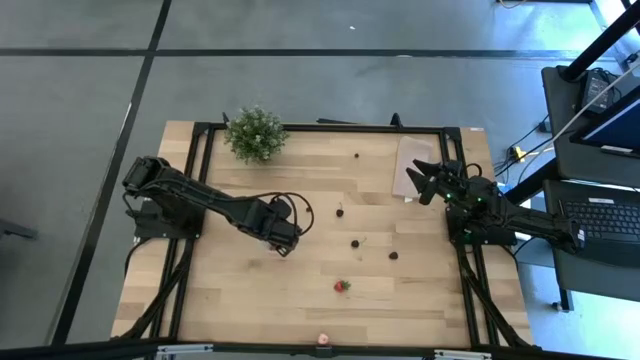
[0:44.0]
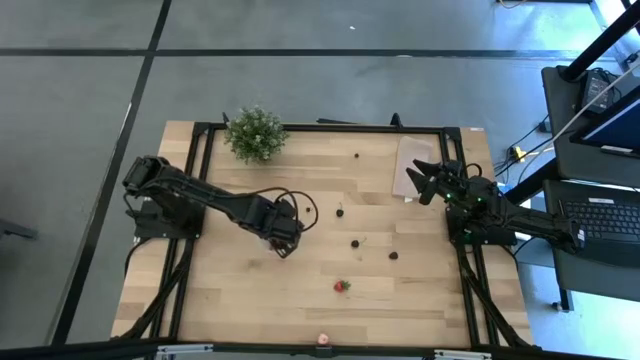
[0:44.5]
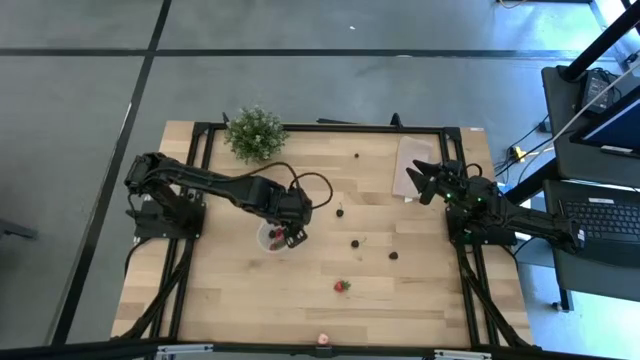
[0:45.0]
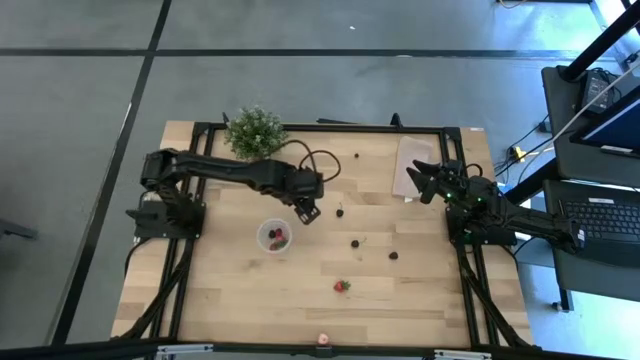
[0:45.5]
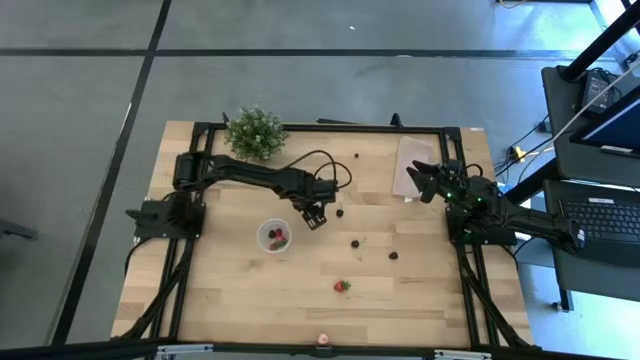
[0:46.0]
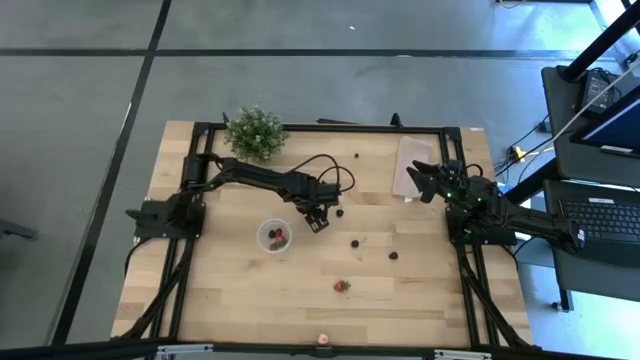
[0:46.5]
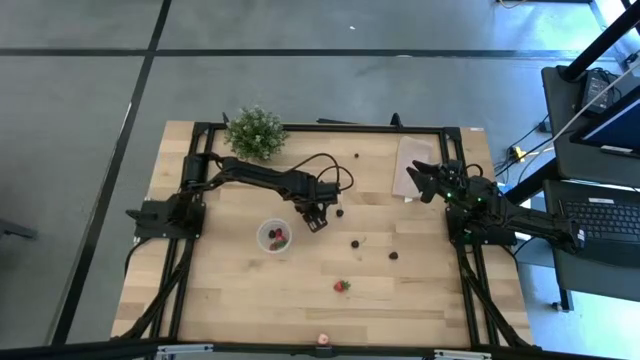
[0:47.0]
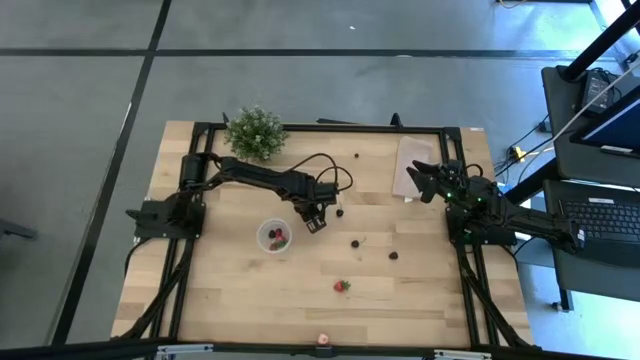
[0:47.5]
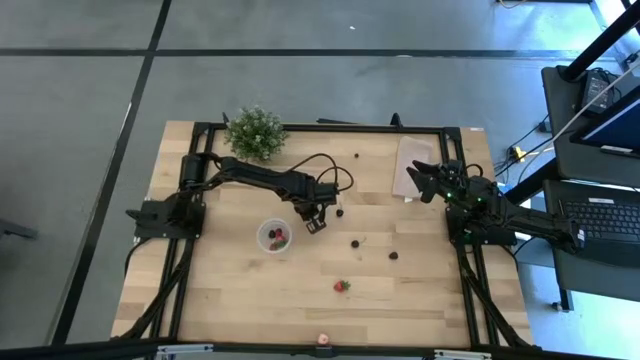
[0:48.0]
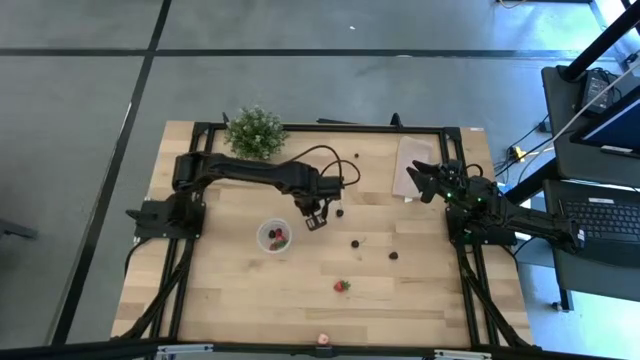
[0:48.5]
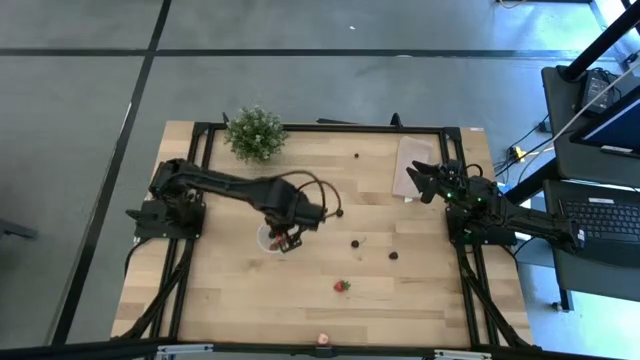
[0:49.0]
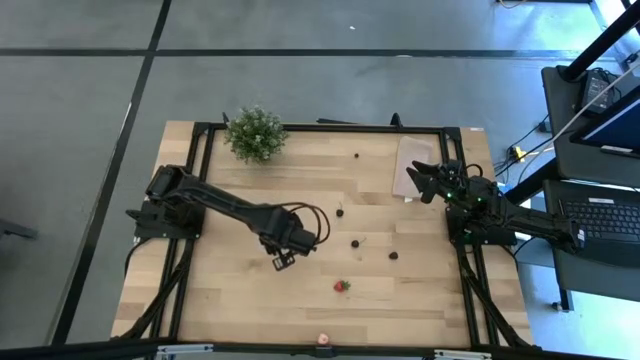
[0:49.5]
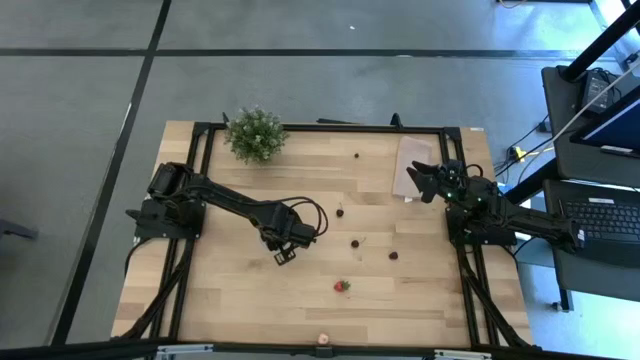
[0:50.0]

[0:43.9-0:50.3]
Task: Pick and placing Produce into tupperware
Put the blueberry into the container

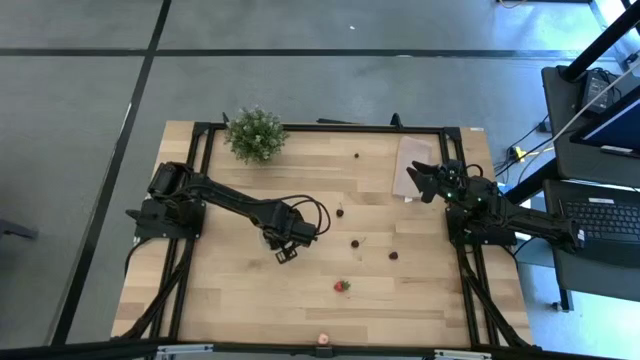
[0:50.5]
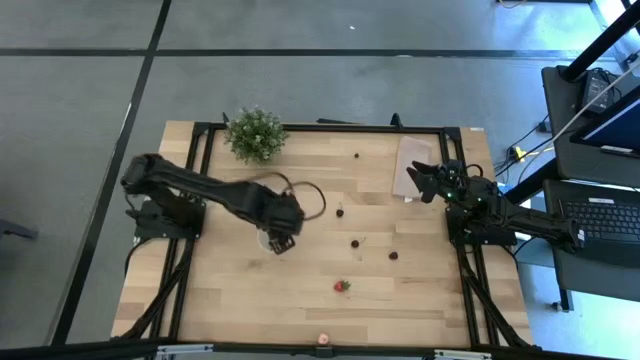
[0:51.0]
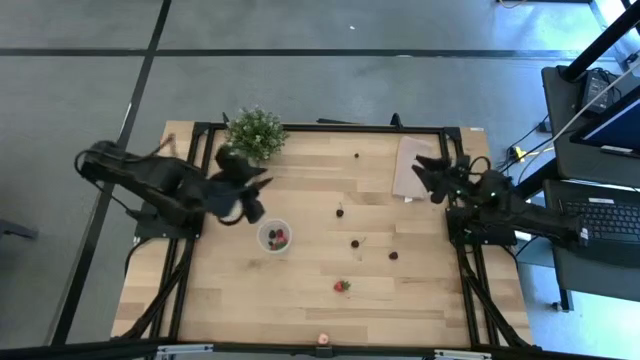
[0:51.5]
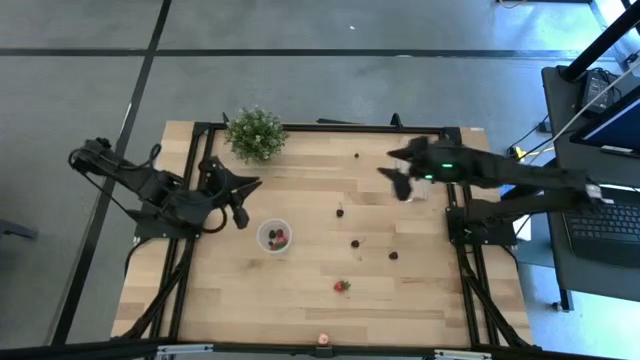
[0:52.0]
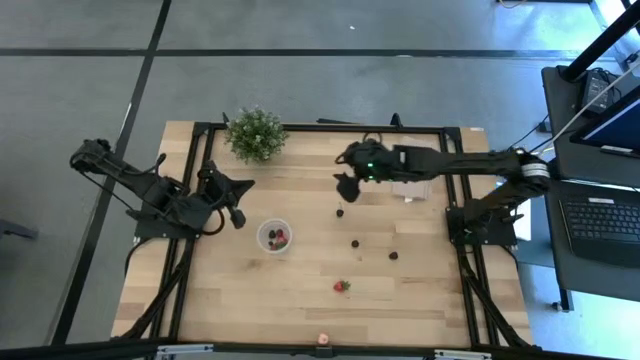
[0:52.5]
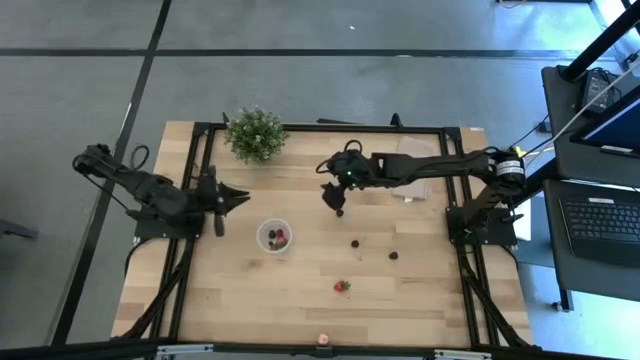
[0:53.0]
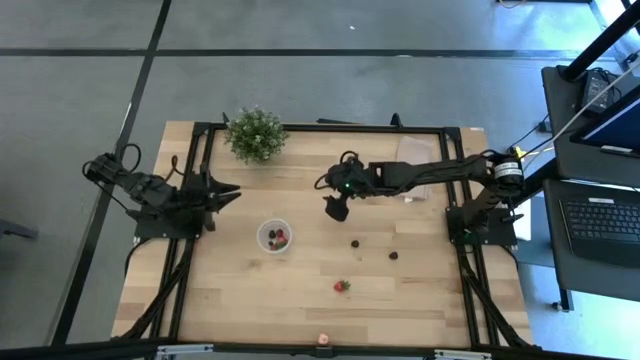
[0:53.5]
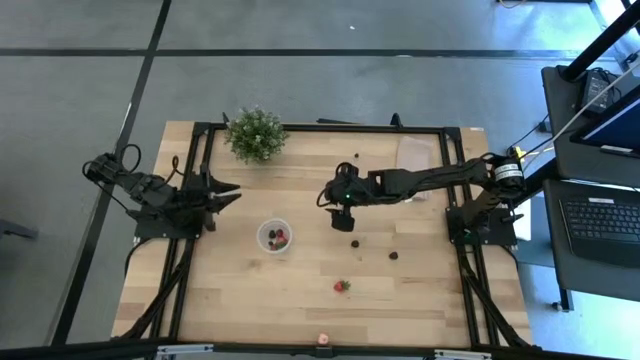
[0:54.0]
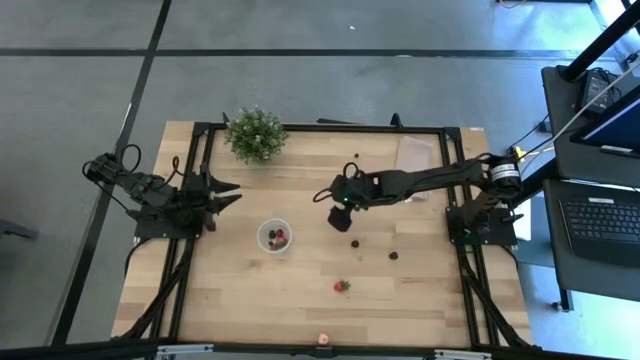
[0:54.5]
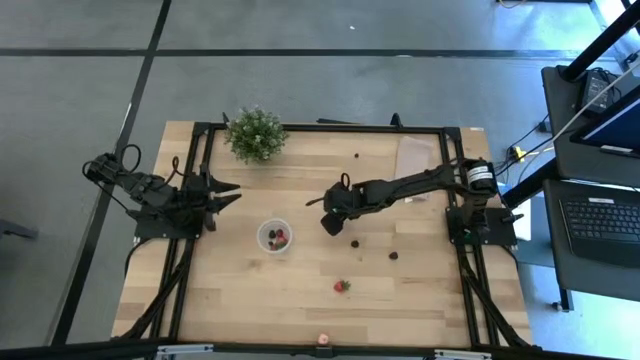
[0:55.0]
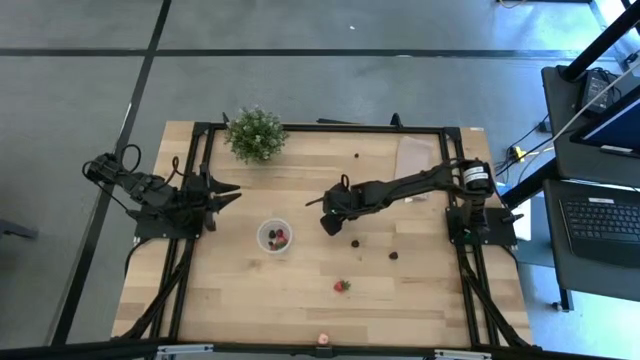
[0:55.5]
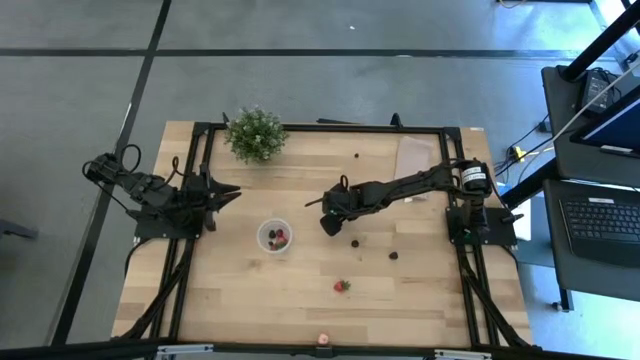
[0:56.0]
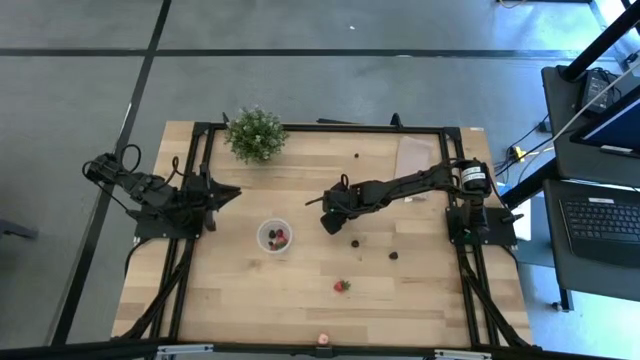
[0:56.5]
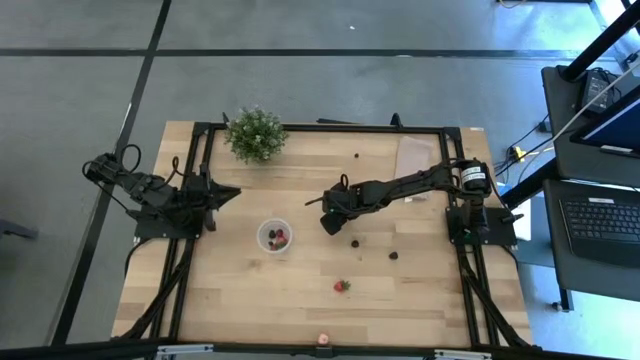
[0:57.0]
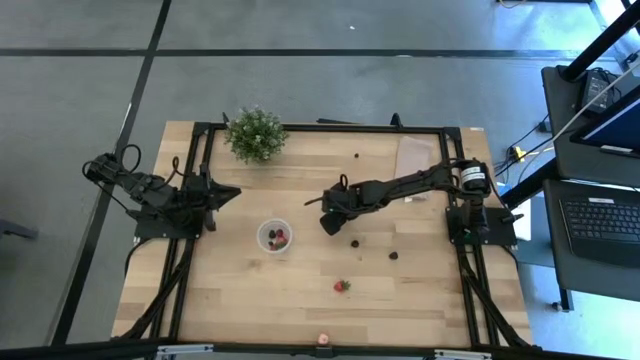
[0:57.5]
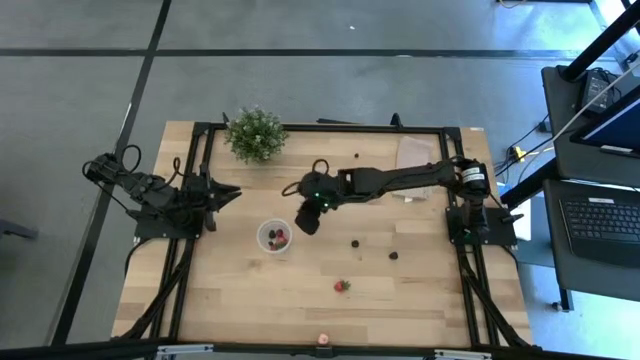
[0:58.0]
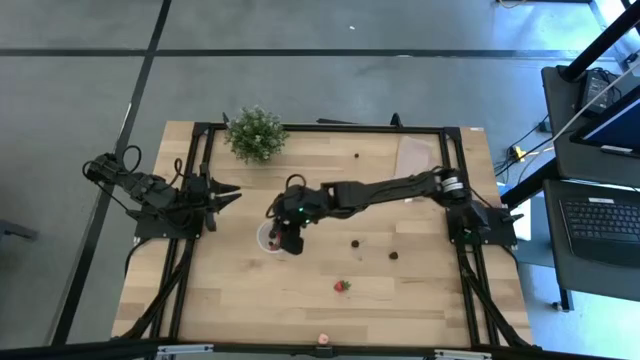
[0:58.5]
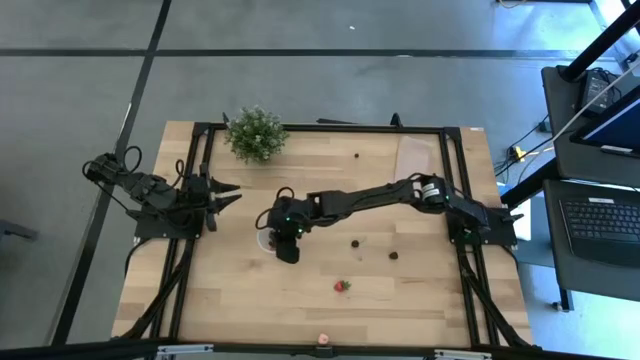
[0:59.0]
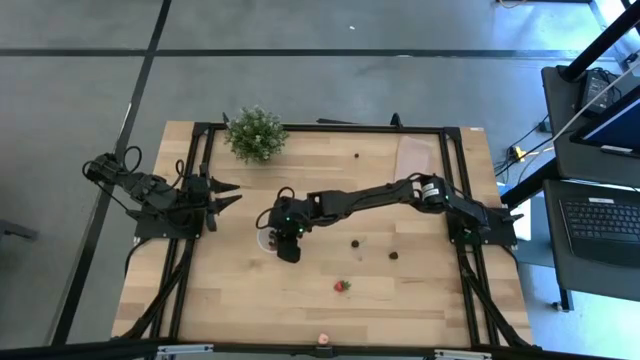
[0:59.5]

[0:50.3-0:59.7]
Put the blueberry into the container

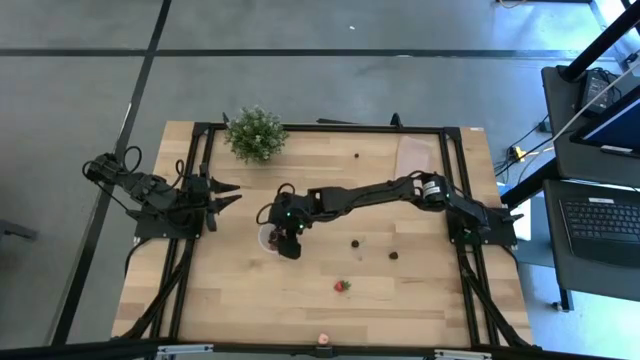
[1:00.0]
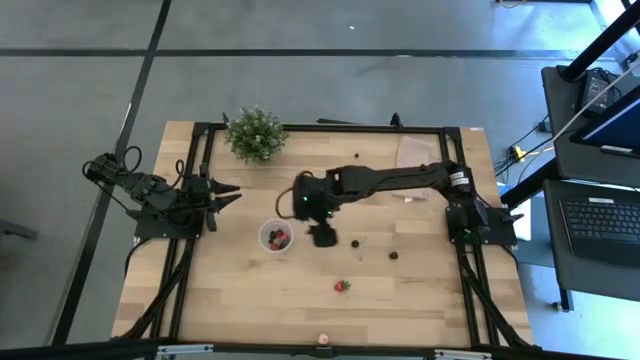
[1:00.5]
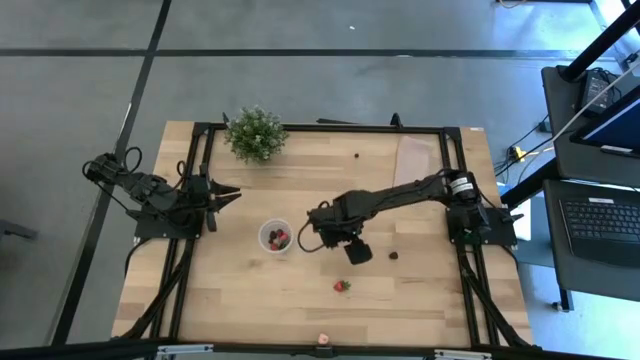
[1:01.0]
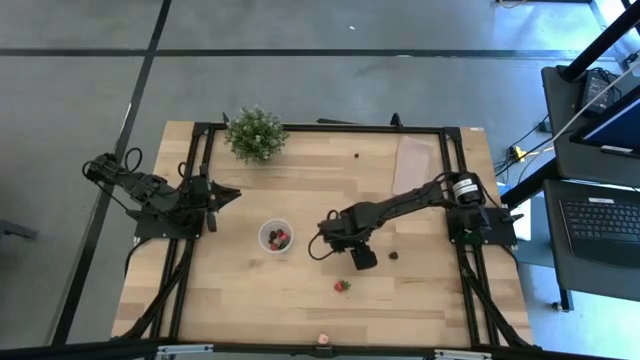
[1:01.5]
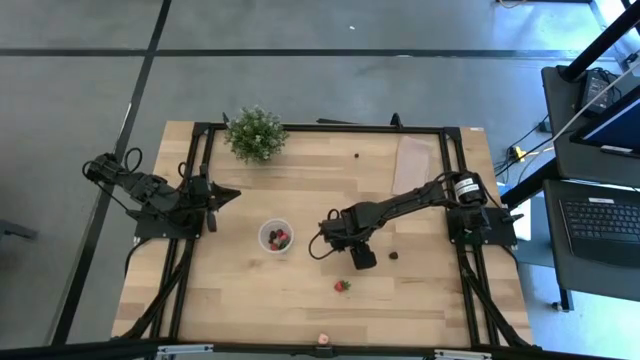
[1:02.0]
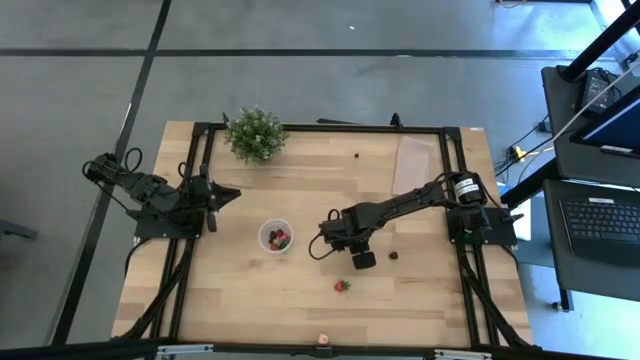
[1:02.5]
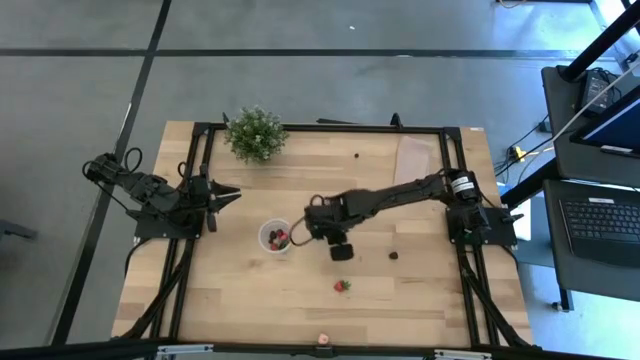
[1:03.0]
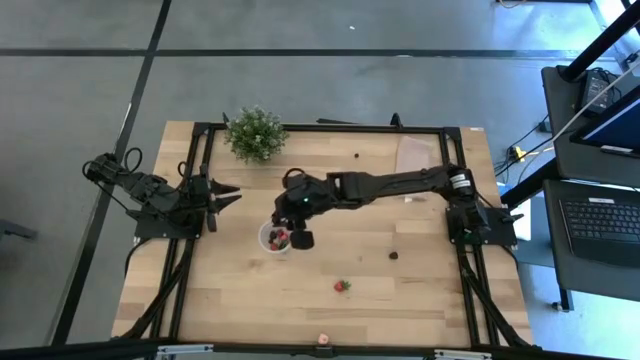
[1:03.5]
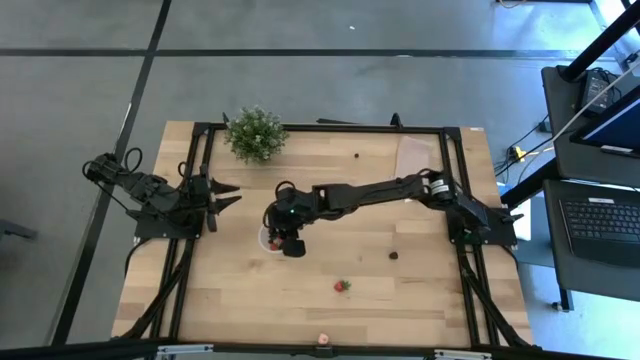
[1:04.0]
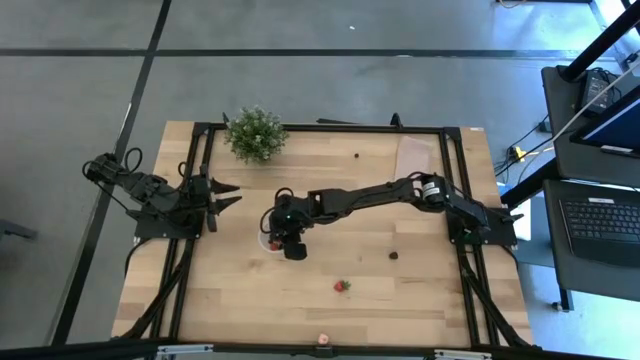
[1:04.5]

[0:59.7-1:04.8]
Put the blueberry into the container

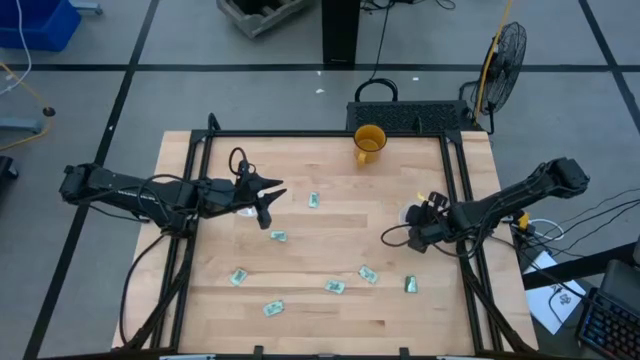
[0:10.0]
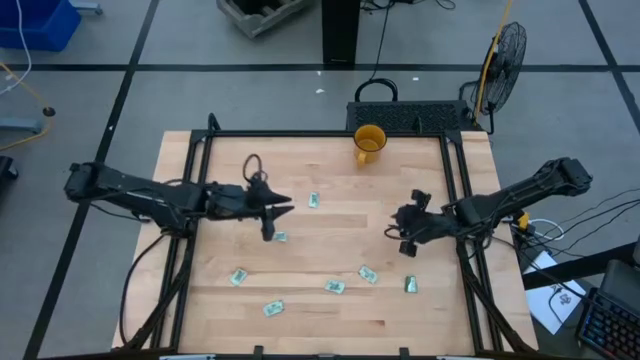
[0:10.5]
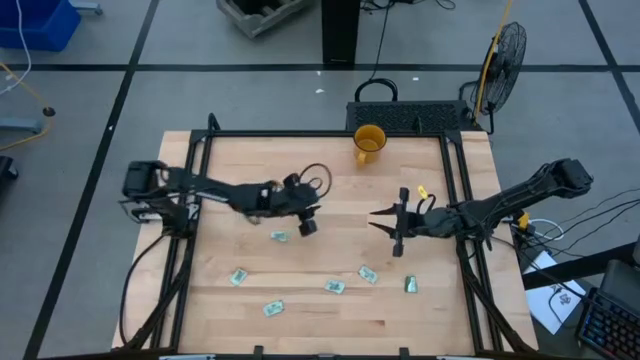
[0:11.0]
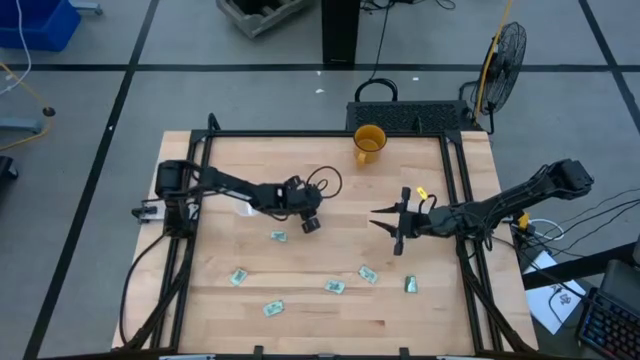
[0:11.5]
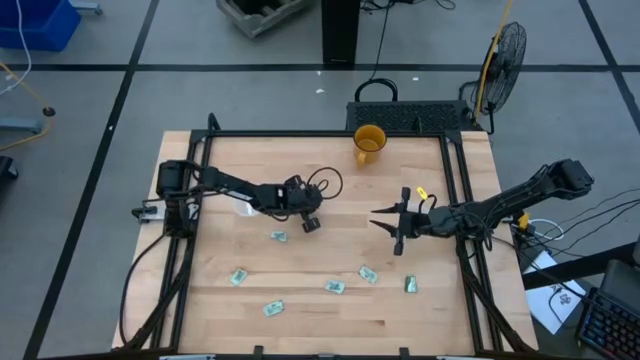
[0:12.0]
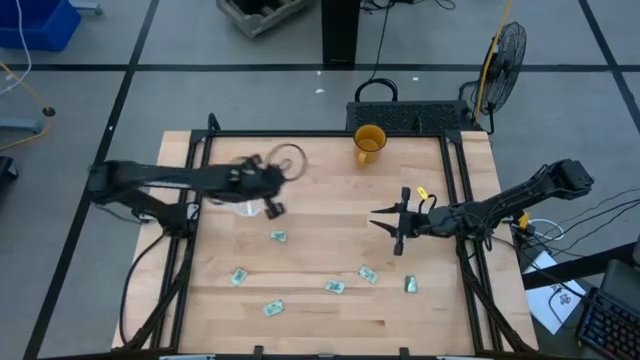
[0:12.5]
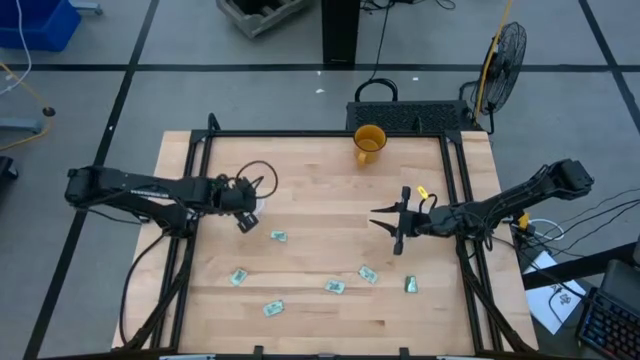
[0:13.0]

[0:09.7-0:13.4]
Task: Pick and place Stevia / Truvia into bins
Put the stevia packet into the left transparent container
